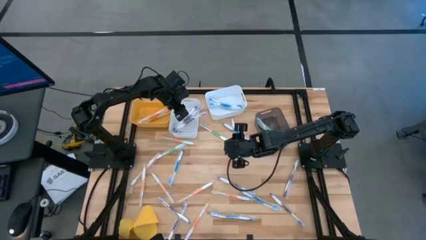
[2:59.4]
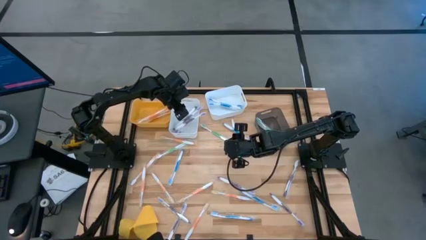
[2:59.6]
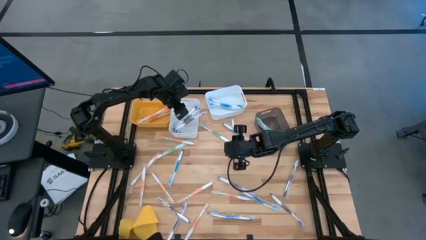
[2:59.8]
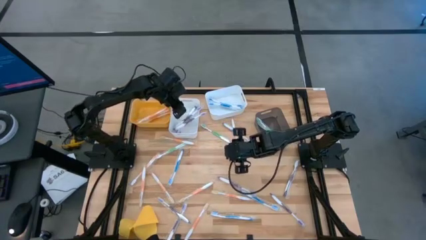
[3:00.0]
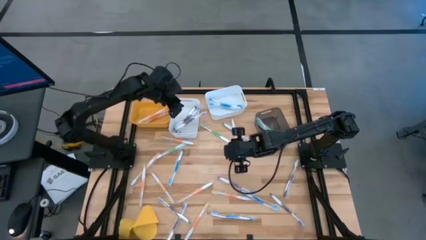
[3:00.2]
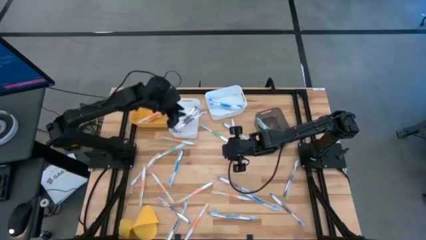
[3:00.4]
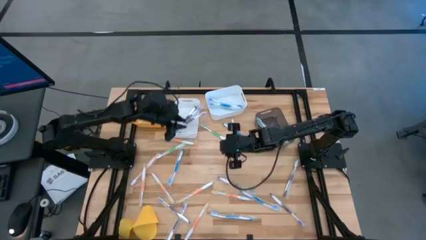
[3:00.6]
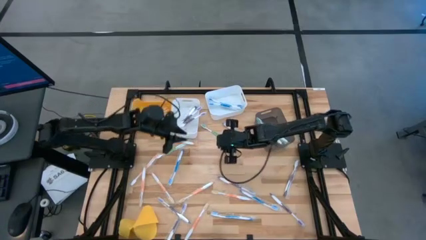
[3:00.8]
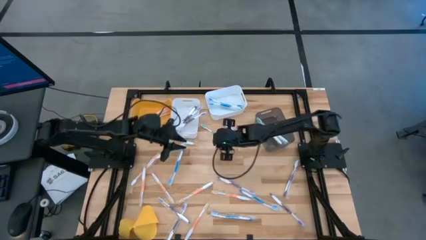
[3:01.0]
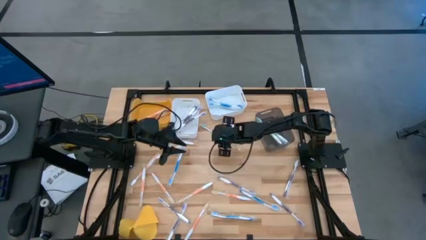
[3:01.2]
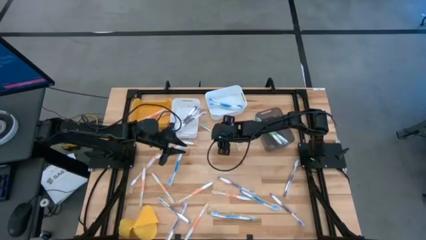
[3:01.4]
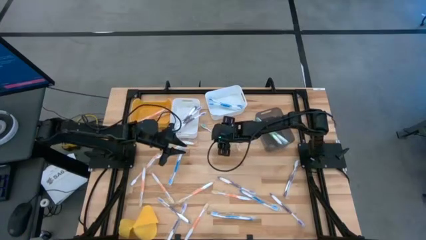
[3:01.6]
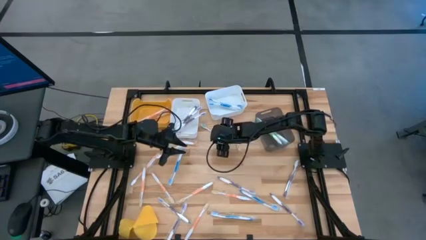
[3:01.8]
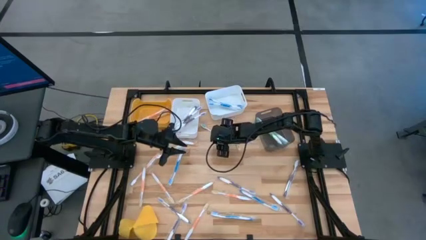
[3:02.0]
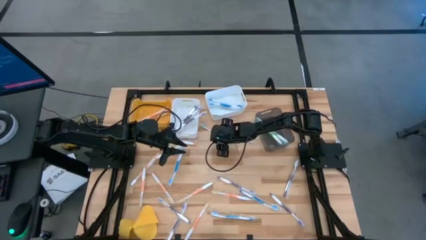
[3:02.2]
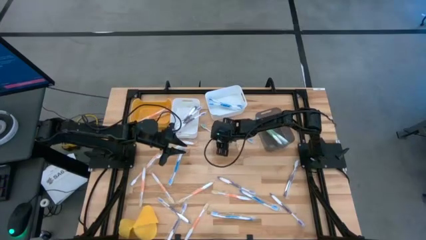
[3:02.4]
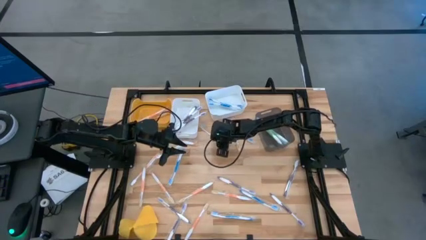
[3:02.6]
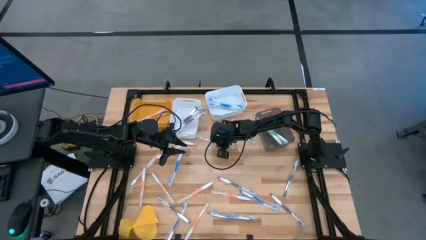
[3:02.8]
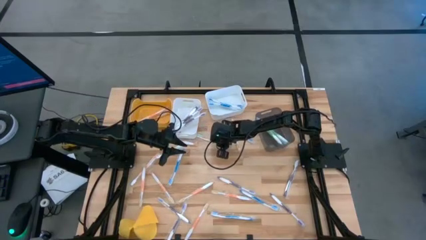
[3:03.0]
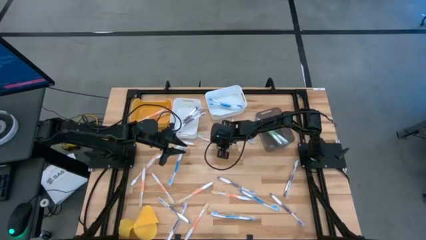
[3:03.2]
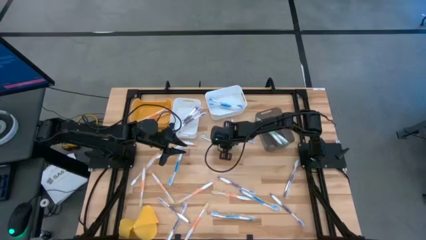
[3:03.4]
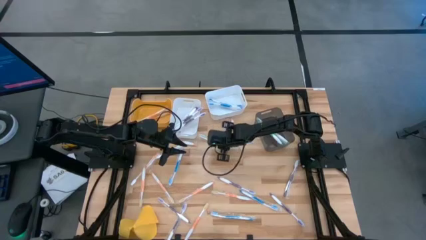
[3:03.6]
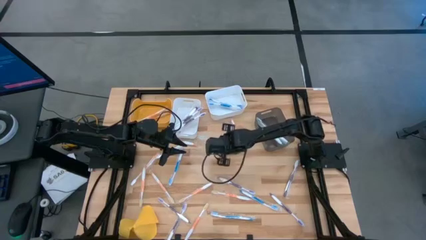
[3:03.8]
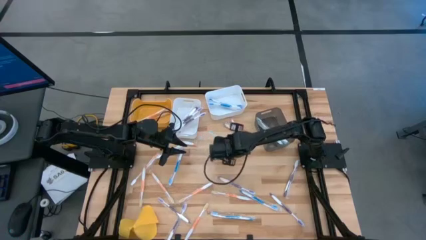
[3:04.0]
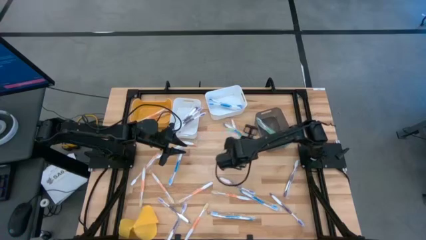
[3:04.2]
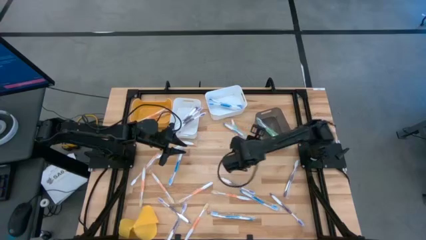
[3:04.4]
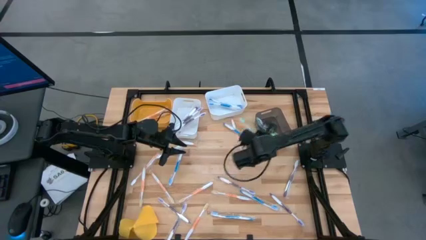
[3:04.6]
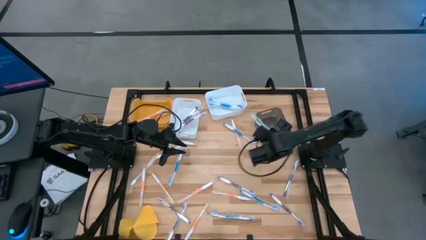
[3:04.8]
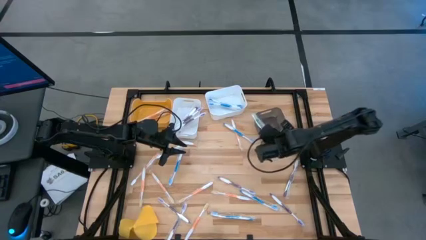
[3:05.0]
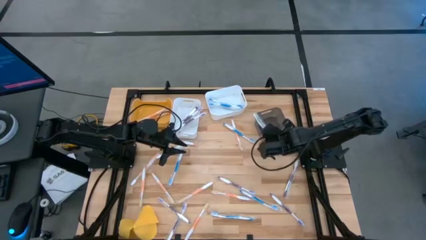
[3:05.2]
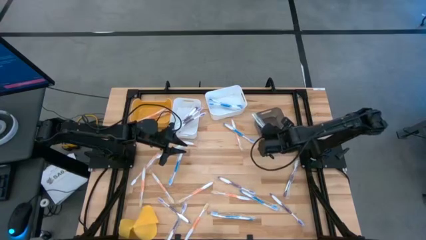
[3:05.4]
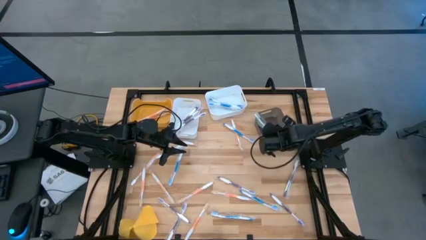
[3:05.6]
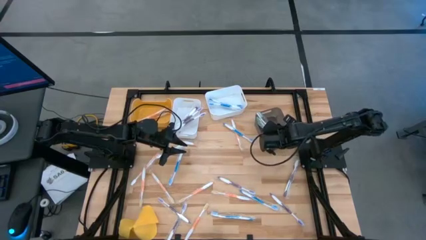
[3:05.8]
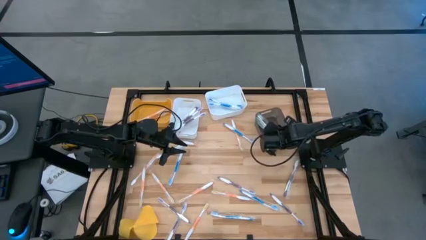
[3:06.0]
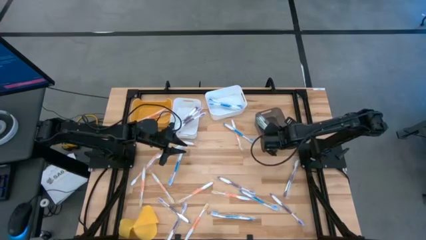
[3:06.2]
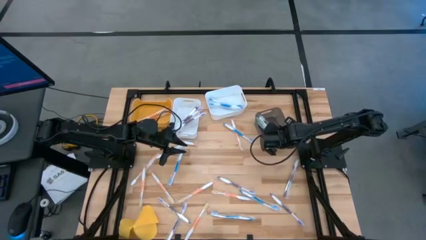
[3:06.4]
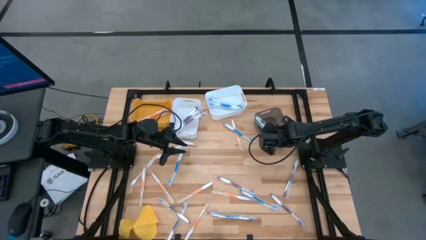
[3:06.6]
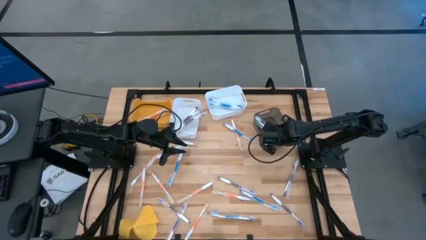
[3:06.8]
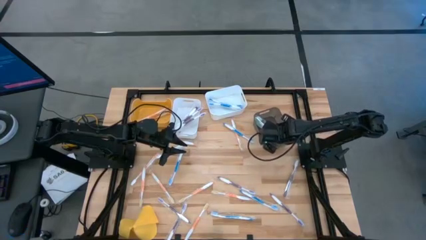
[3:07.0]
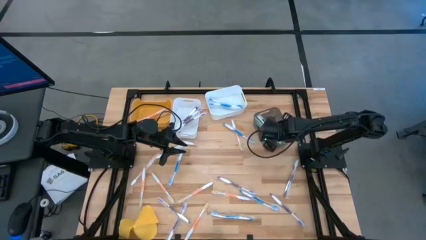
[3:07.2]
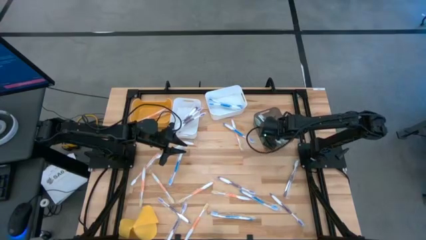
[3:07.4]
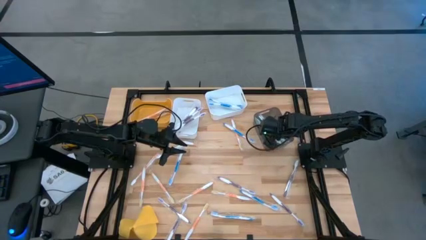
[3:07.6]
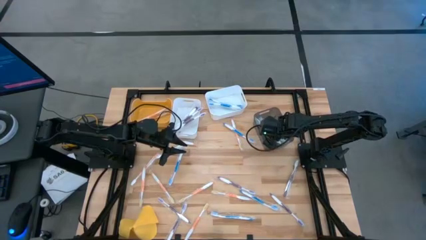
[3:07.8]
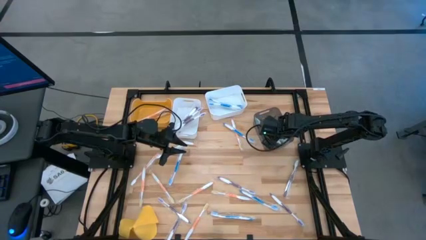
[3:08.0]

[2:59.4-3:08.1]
Task: Pick & Place Toothbrushes
Put the green toothbrush into the black bin

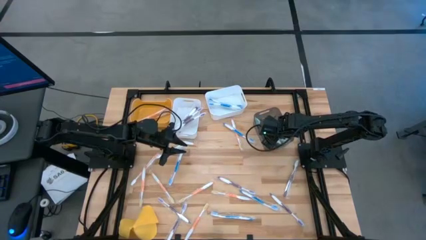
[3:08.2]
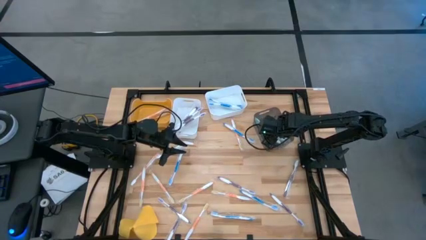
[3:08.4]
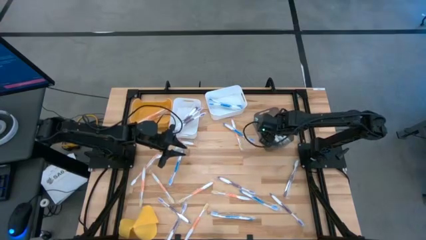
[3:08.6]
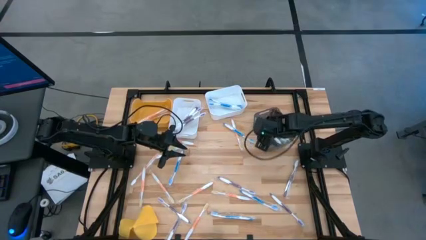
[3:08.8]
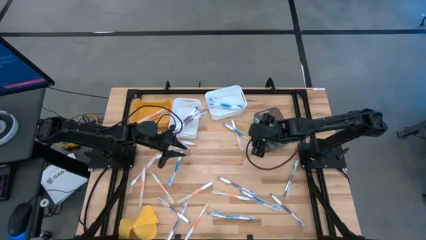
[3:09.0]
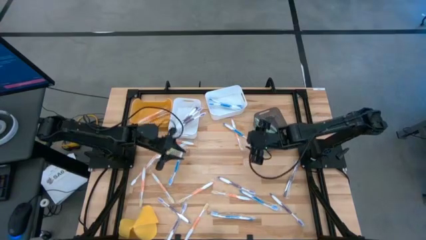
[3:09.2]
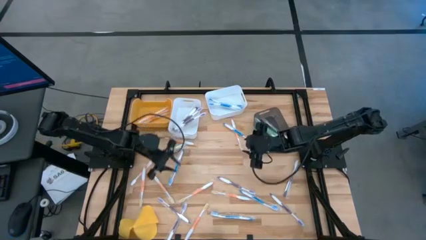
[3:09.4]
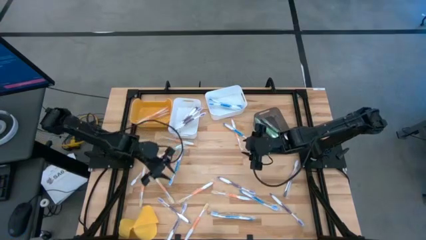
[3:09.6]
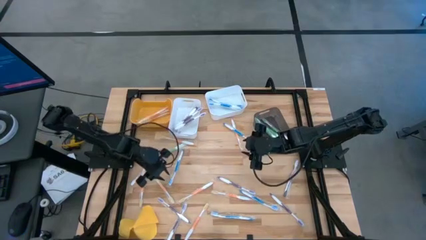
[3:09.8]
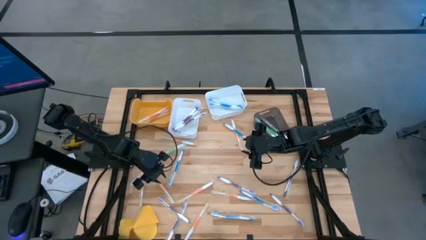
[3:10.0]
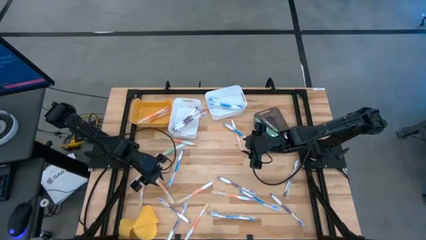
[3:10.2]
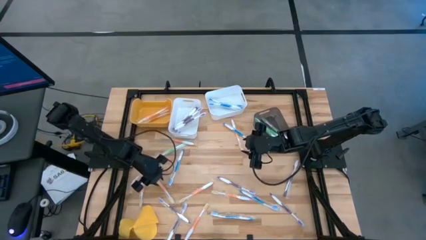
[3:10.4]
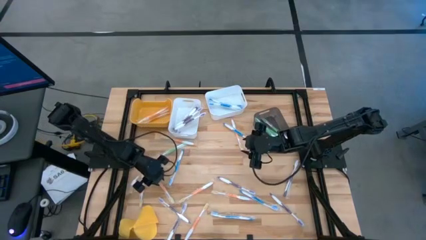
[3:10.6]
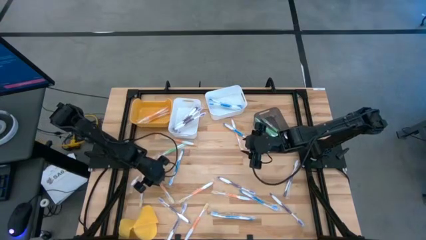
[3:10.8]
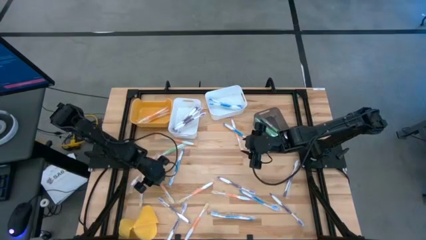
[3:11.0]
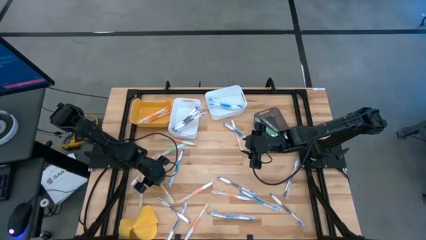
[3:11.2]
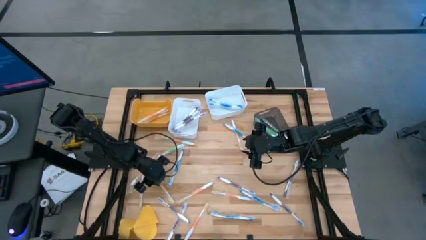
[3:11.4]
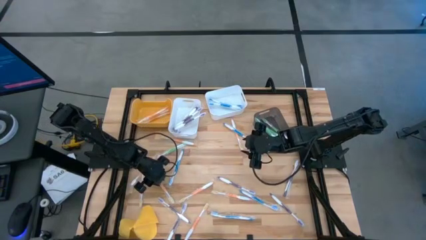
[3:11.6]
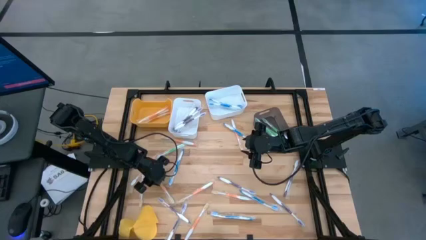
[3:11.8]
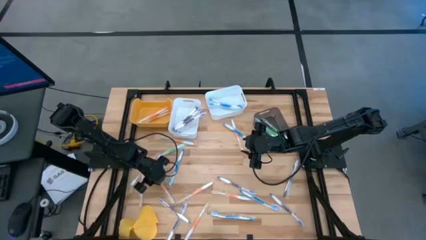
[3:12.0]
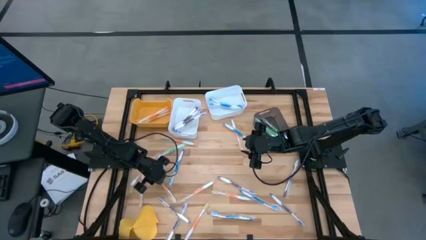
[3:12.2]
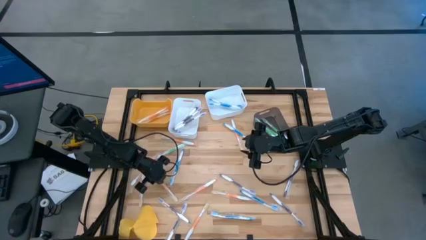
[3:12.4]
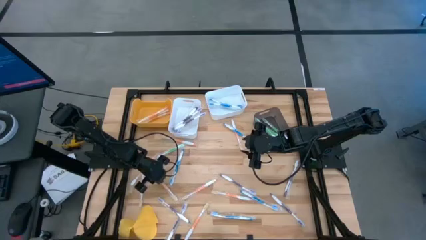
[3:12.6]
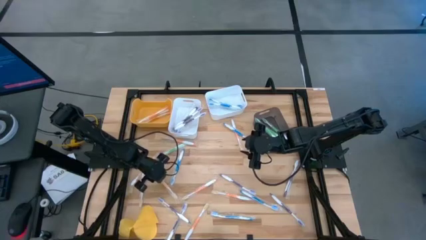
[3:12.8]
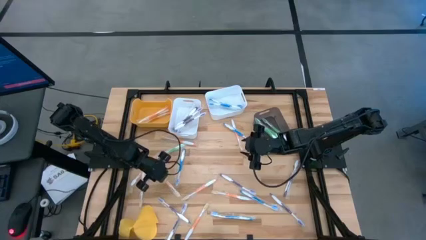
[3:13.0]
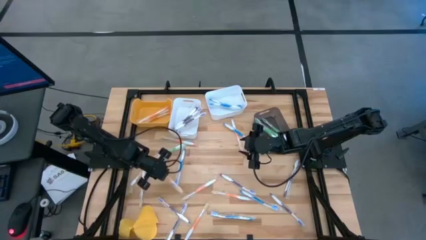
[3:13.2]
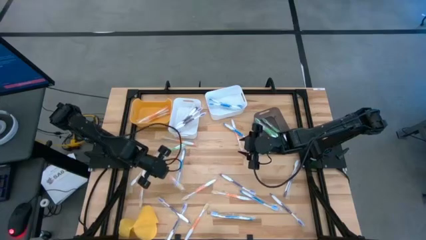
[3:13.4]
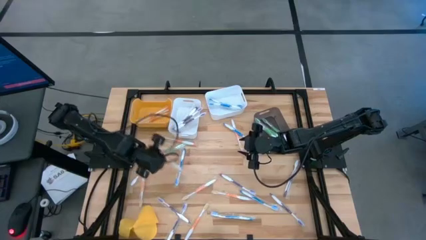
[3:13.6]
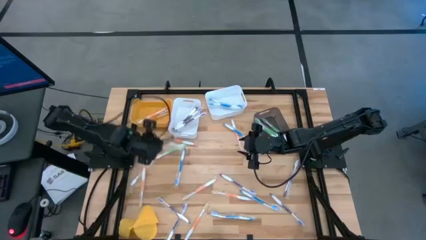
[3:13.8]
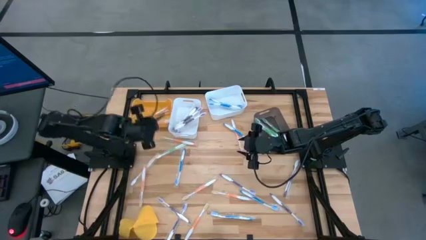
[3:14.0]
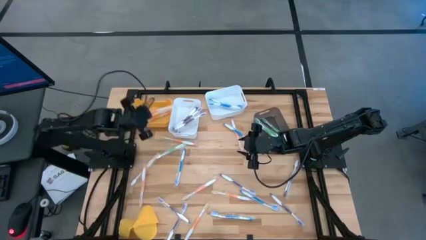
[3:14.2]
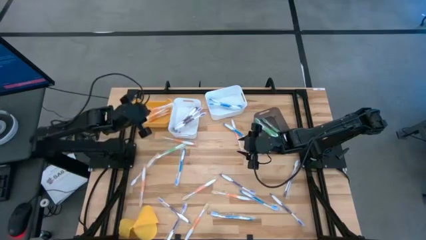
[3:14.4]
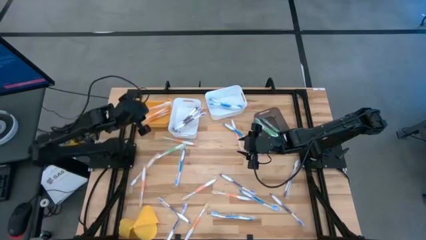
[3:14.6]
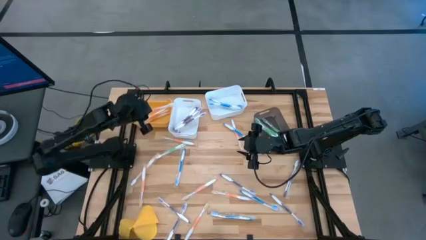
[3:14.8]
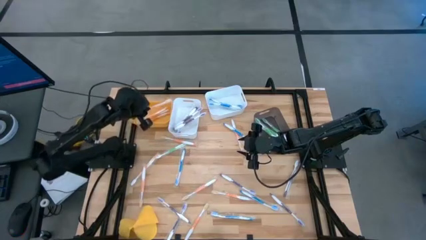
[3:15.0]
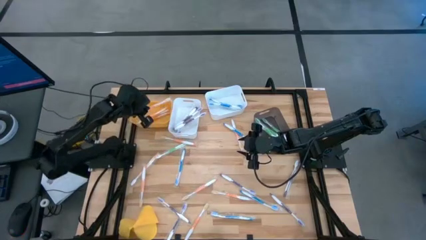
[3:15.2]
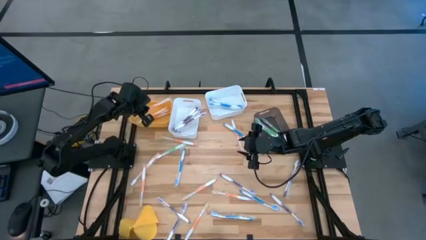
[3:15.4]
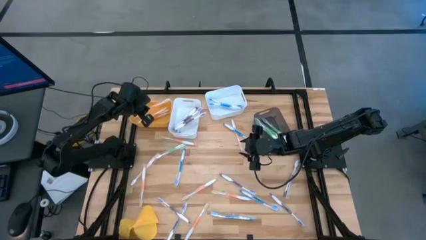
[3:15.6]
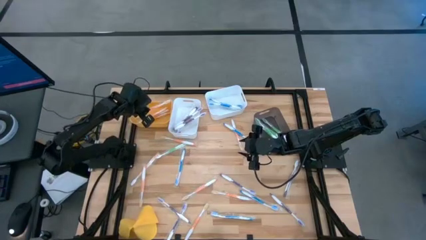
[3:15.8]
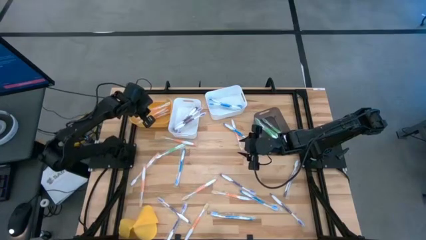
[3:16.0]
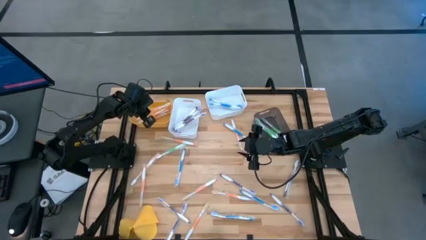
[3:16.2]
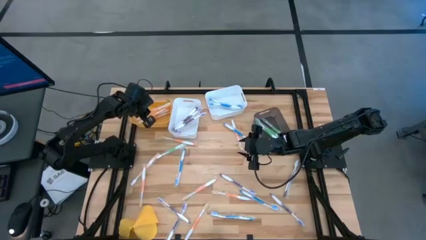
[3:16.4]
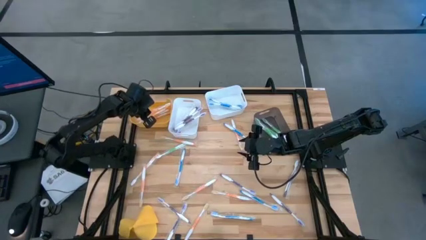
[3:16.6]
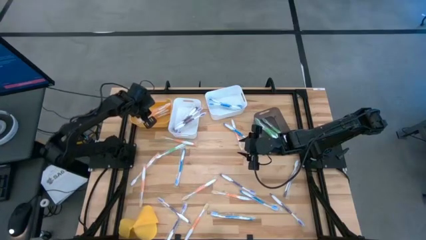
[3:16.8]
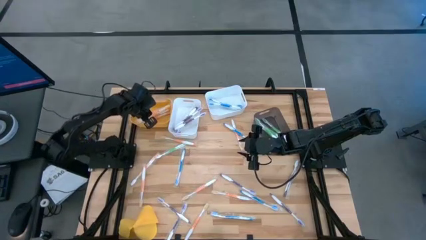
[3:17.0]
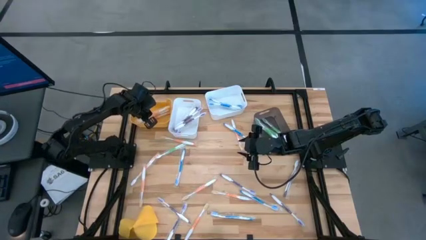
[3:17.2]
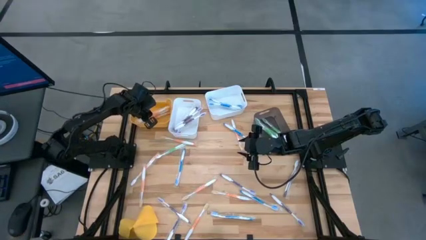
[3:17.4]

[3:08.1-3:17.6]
Put the orange toothbrush into the yellow bin
